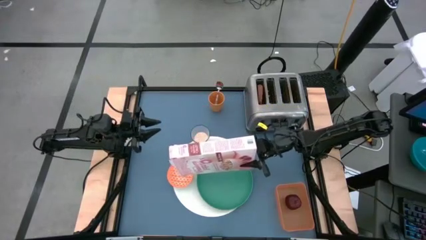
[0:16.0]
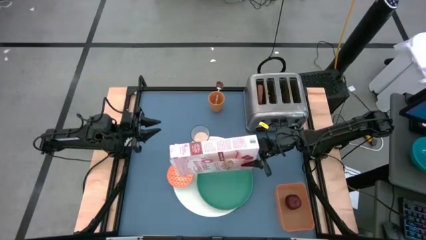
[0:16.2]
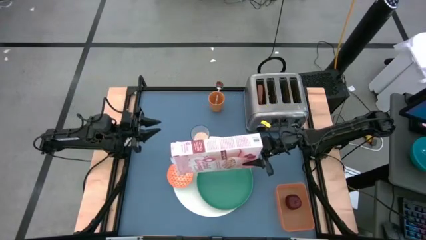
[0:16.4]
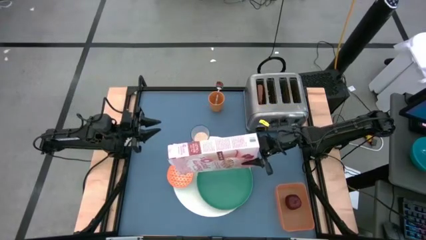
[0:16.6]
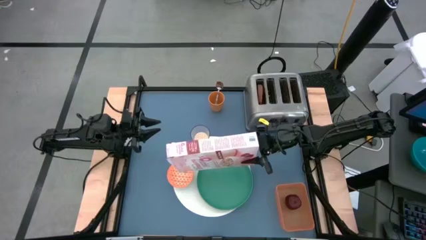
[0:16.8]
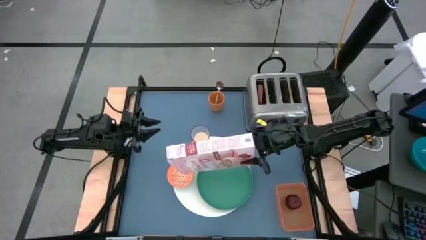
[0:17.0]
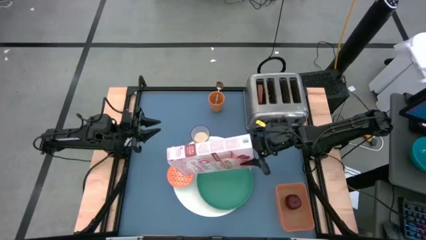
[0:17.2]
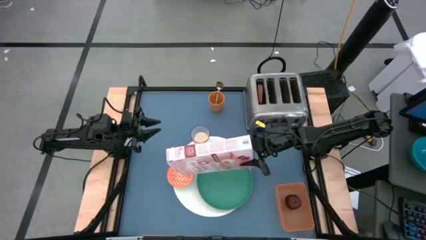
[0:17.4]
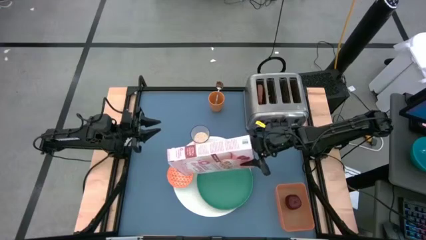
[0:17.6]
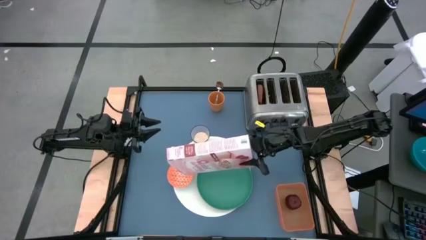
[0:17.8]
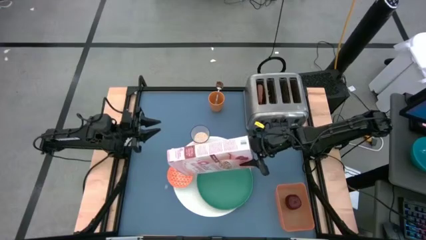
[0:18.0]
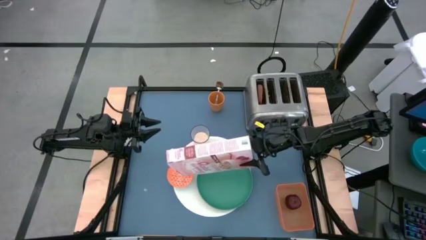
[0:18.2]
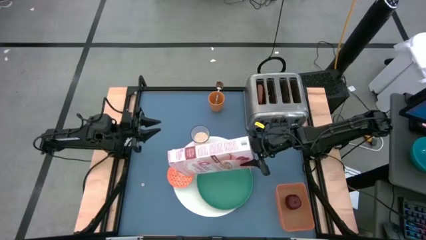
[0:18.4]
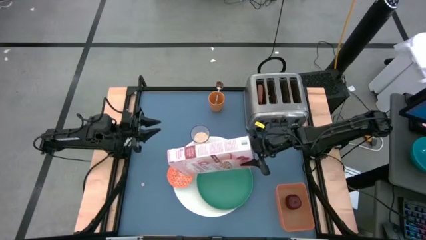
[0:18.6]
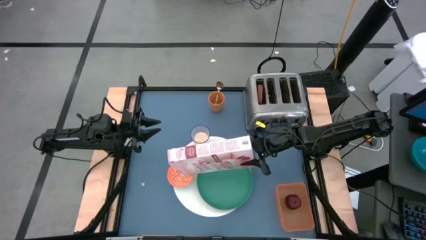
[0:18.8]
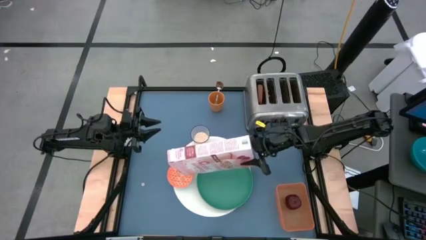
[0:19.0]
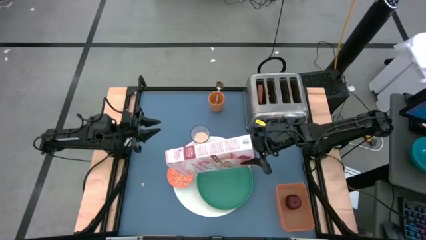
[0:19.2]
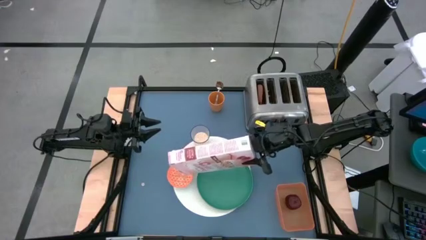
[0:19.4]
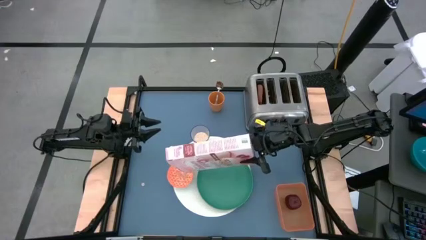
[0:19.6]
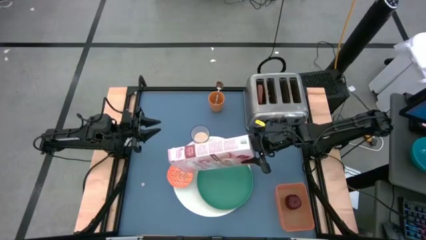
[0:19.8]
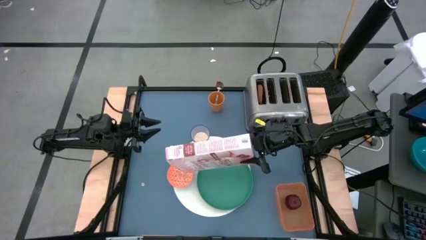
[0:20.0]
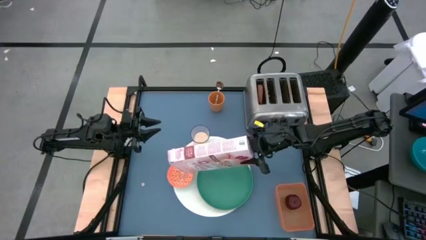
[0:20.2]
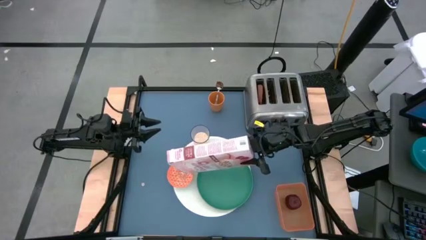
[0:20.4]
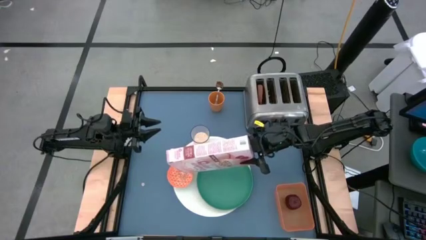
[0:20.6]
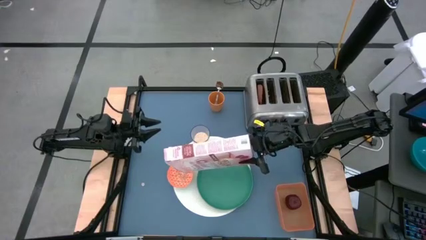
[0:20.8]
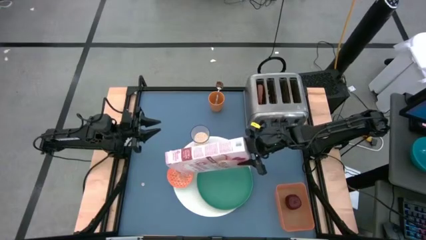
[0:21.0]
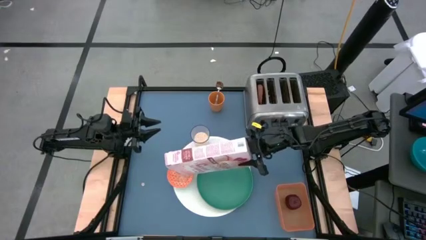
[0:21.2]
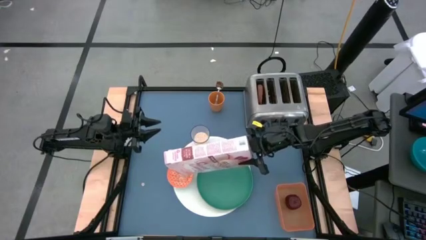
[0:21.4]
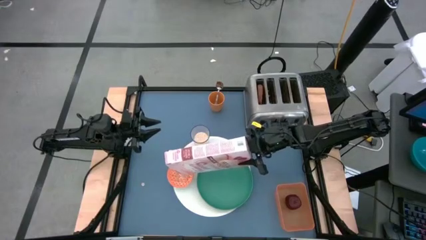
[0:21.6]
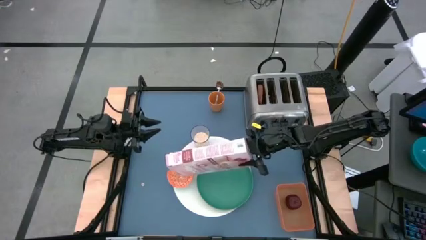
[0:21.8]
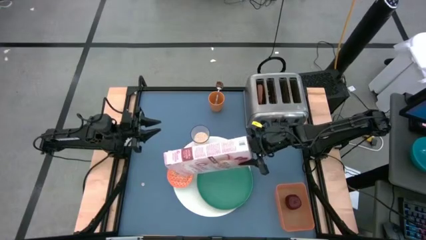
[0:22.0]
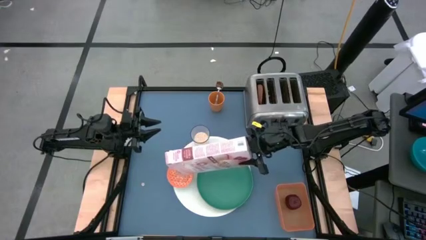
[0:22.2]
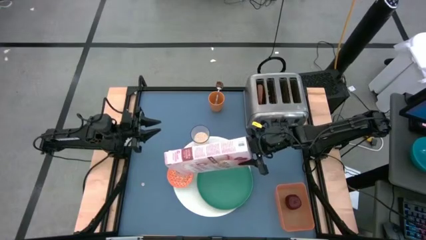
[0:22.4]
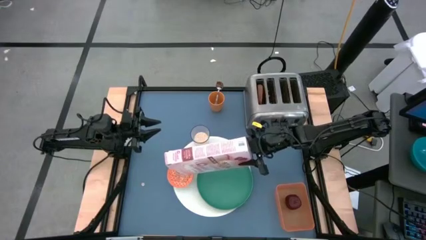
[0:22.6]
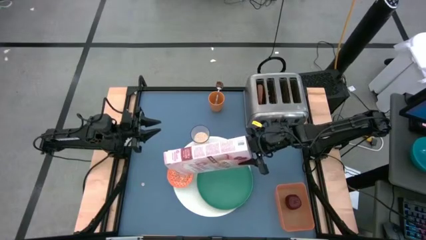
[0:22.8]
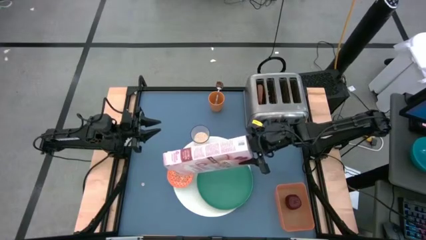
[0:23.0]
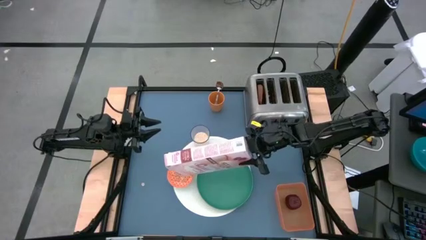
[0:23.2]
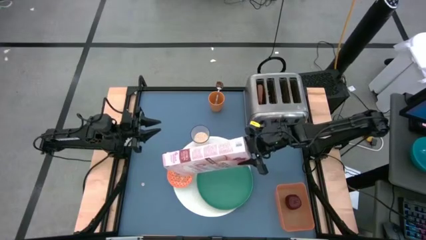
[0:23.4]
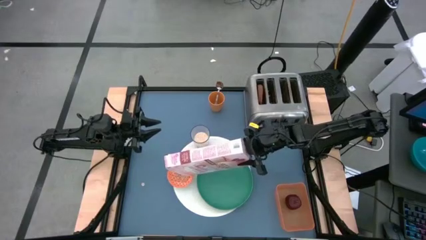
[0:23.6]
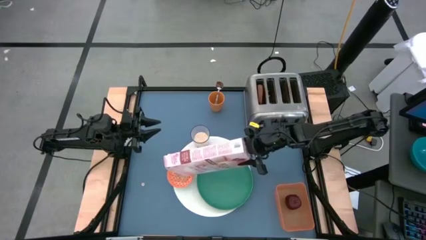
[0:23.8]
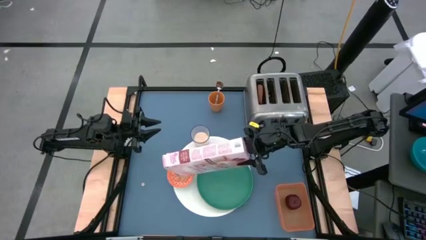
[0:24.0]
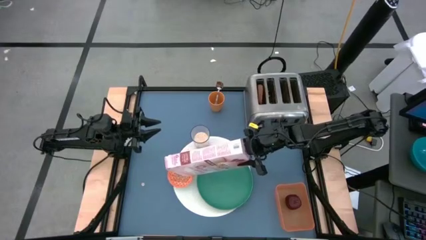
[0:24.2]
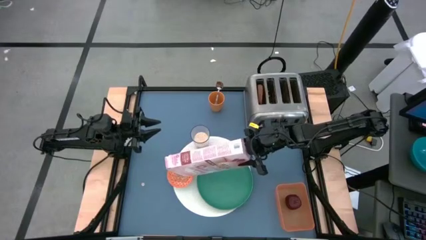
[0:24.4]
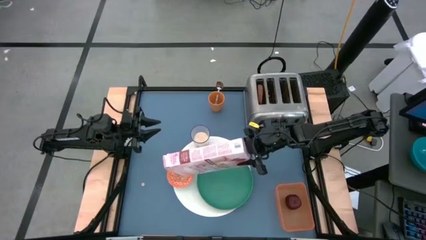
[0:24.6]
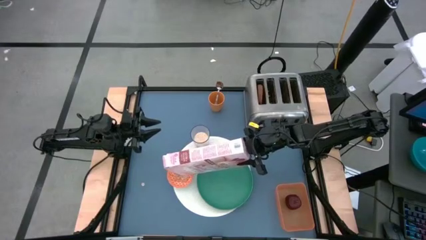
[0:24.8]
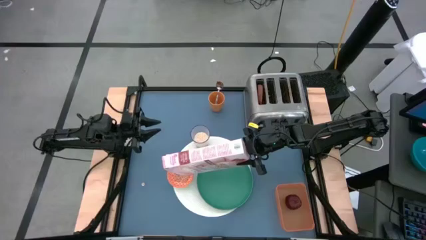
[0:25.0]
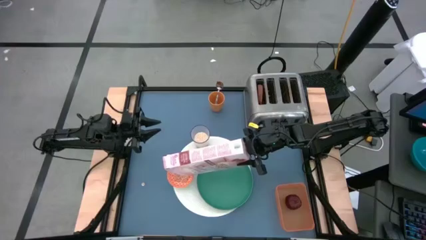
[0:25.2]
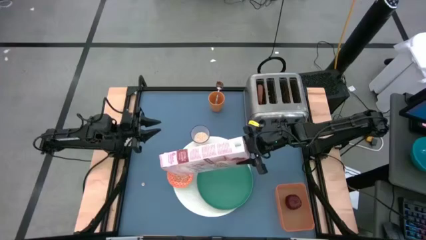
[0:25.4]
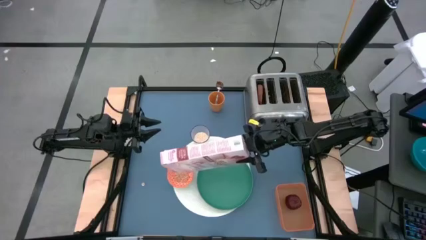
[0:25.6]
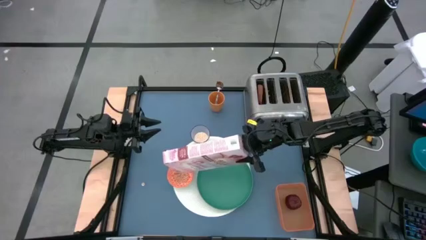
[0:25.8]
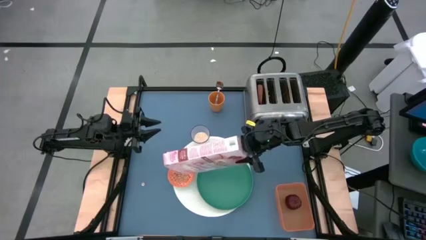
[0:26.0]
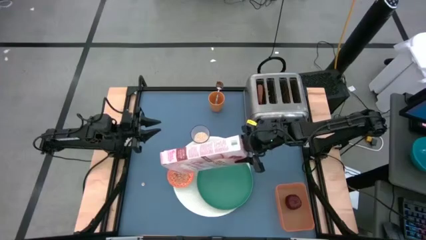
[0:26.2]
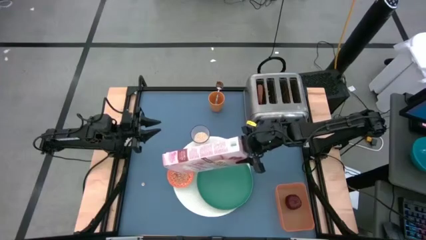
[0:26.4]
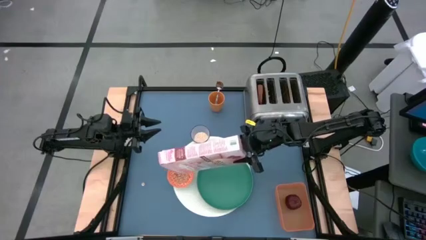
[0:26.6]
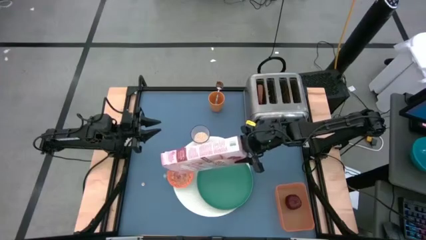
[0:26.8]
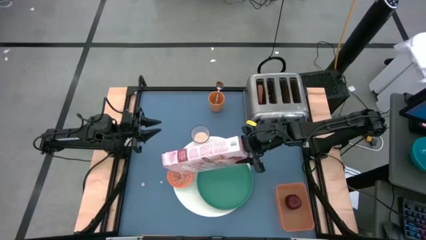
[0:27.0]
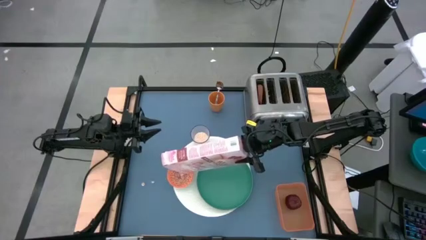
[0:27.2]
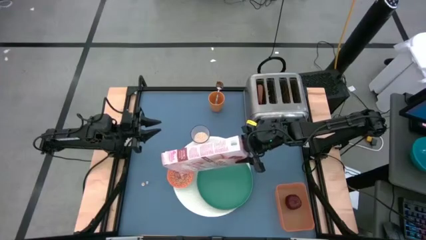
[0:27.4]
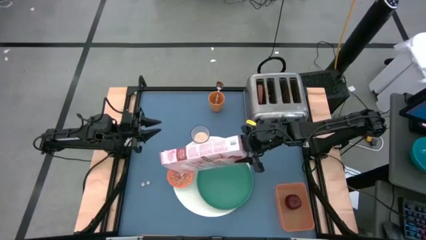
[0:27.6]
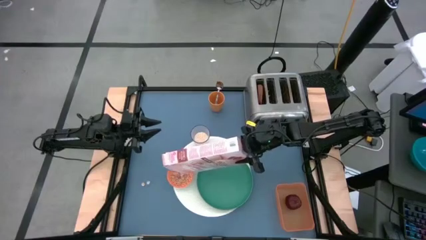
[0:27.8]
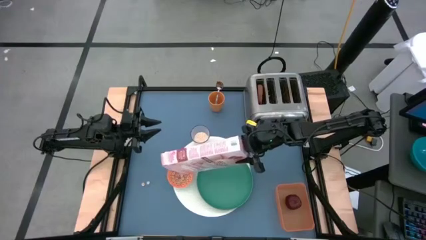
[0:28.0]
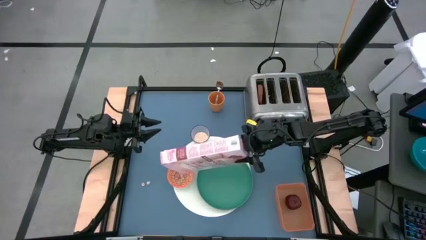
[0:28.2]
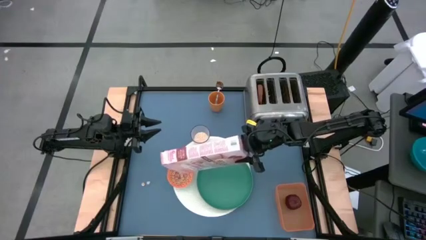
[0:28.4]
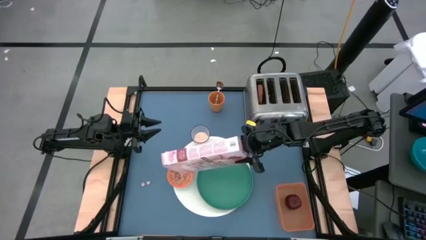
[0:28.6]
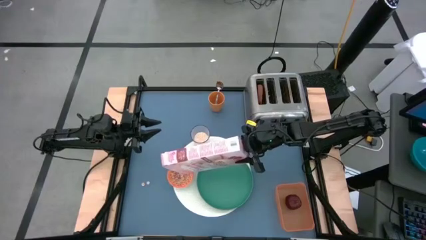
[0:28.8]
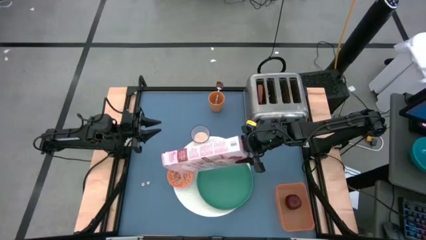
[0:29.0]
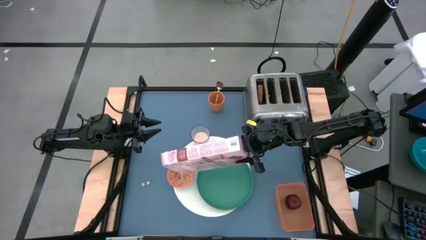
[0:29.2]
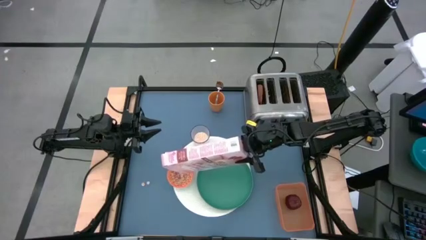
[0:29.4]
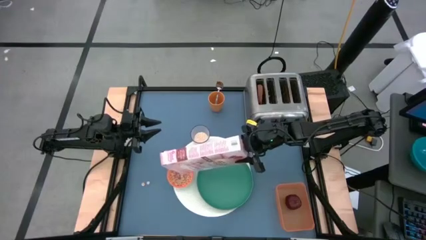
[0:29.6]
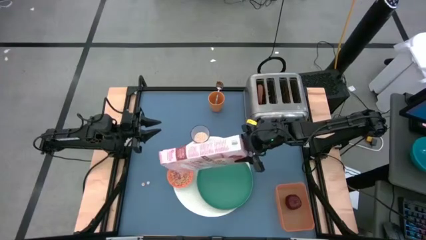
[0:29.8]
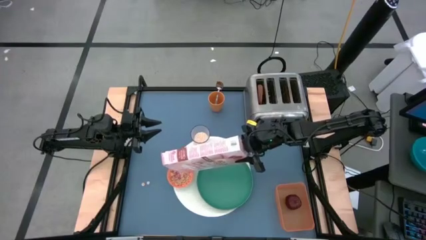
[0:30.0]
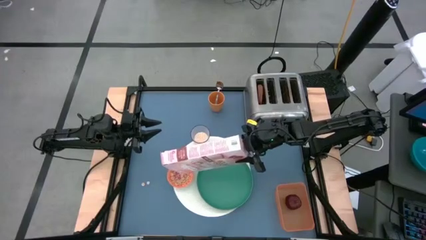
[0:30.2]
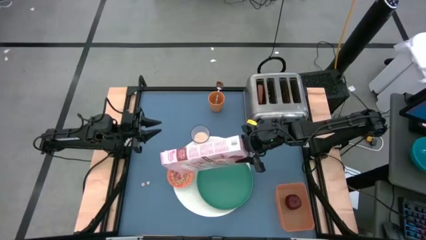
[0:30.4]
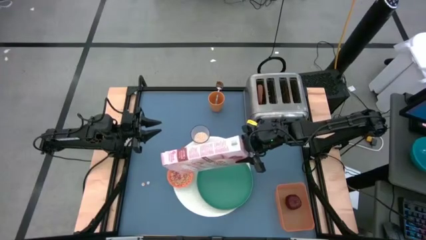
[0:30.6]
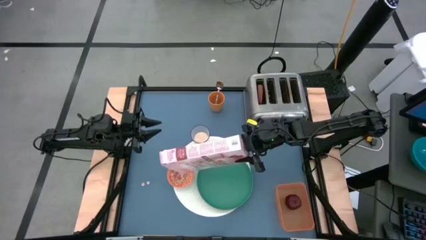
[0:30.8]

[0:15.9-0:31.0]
Task: Arrange a breakfast setting
Pour the cereal from the cereal box into the orange bowl

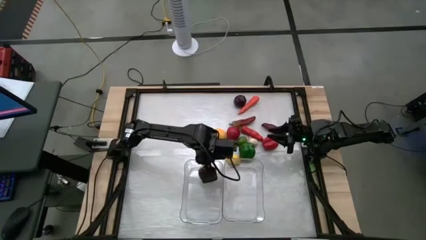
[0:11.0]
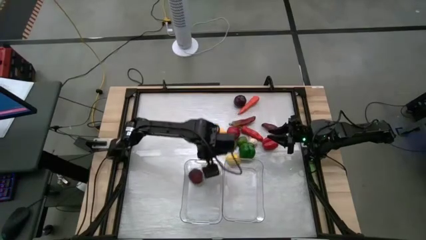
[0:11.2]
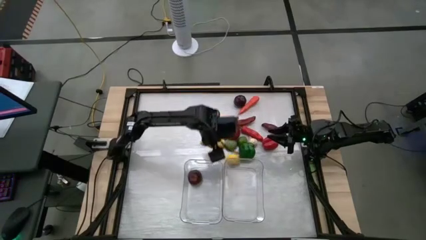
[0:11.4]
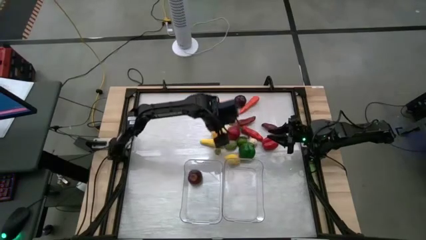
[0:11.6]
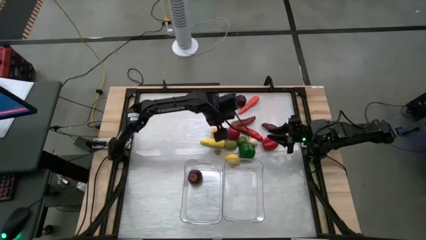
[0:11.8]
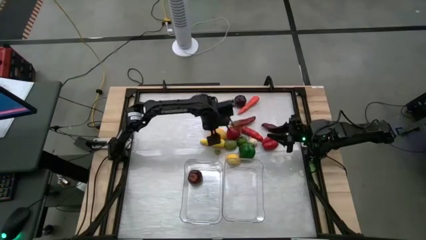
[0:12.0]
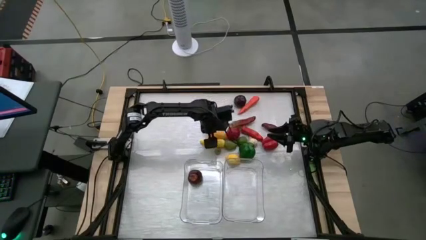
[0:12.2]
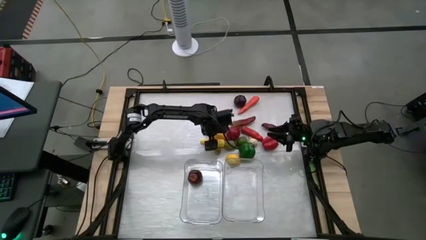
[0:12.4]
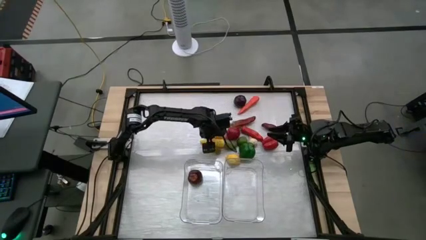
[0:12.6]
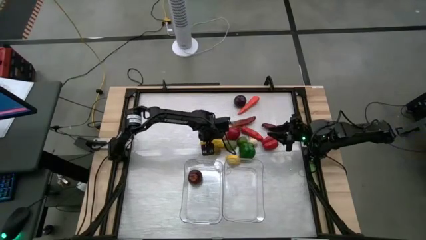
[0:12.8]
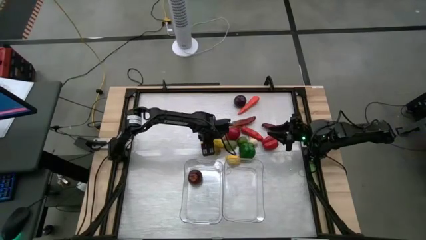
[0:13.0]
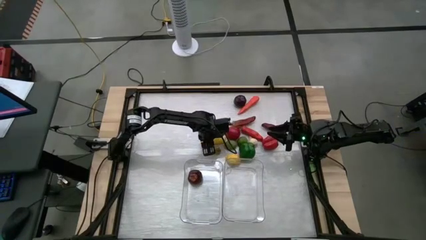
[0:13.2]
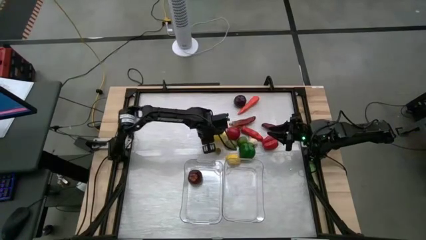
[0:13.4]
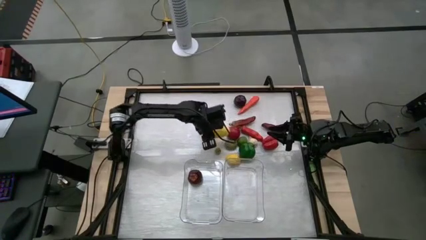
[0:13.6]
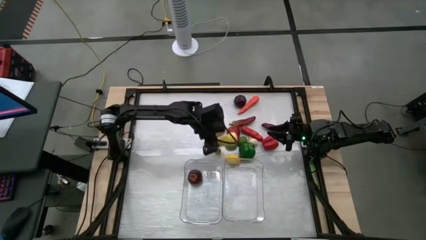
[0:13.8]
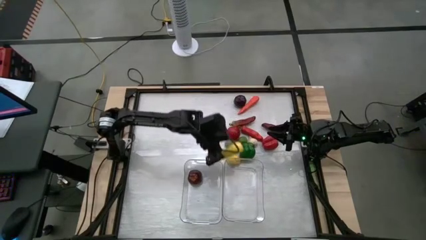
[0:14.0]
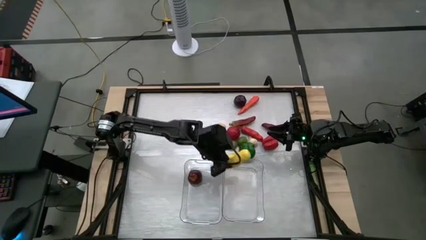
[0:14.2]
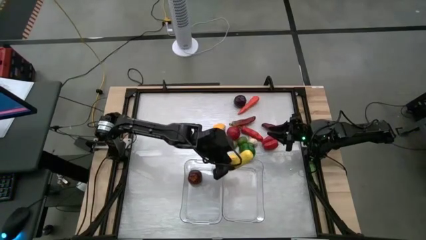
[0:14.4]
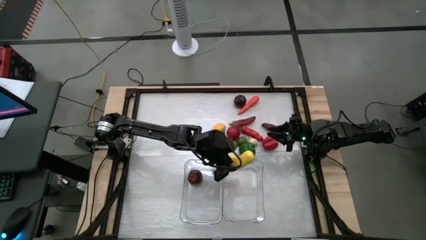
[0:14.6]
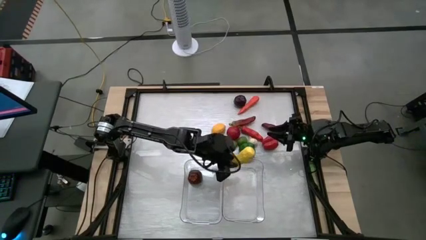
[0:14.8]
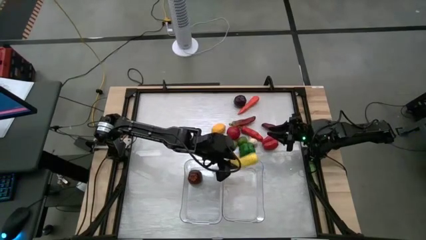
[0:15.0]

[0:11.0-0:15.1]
Task: Sort produce into baskets
Put the corn into the right transparent bin
